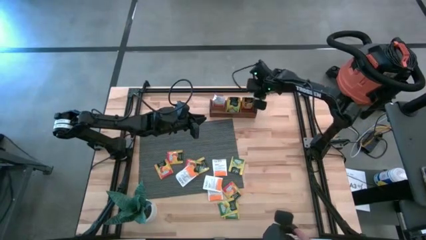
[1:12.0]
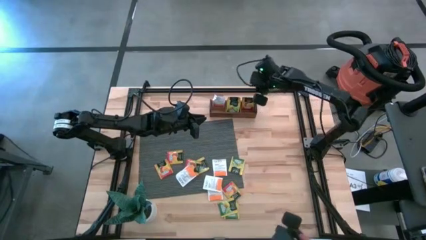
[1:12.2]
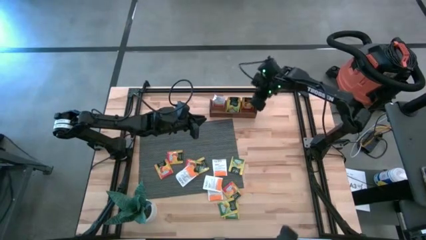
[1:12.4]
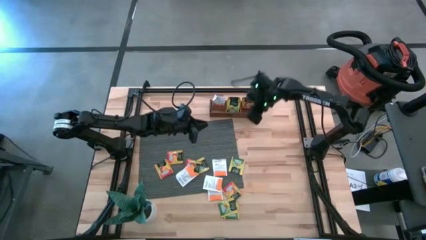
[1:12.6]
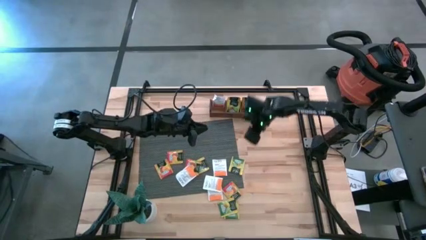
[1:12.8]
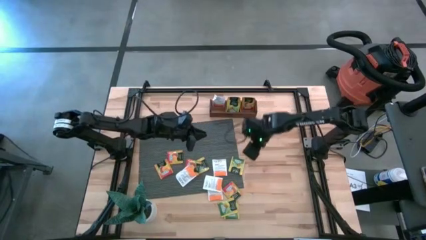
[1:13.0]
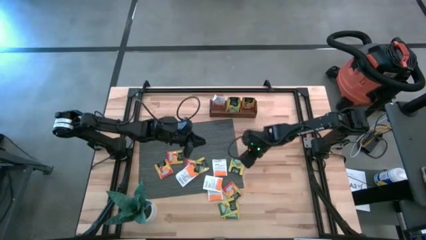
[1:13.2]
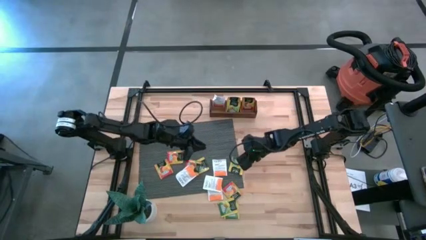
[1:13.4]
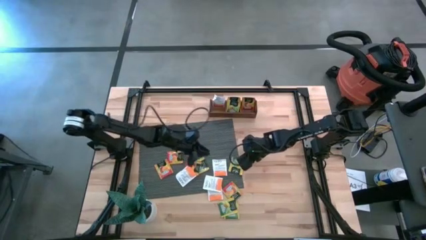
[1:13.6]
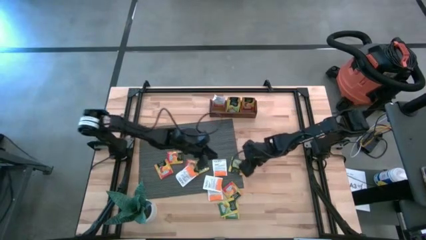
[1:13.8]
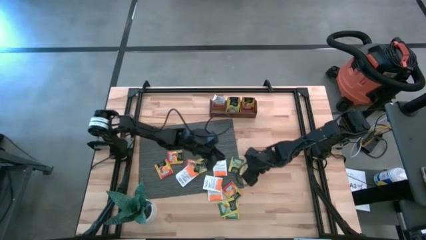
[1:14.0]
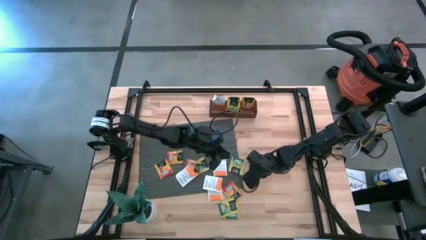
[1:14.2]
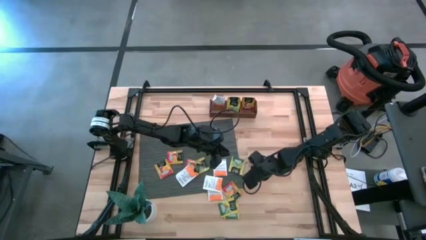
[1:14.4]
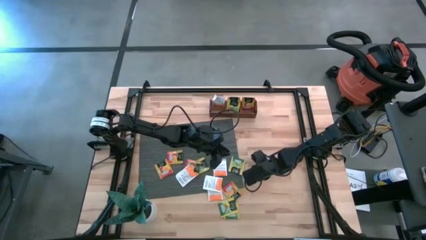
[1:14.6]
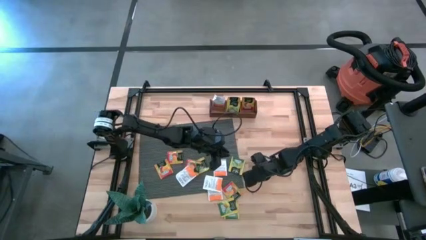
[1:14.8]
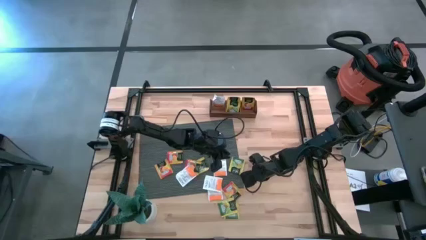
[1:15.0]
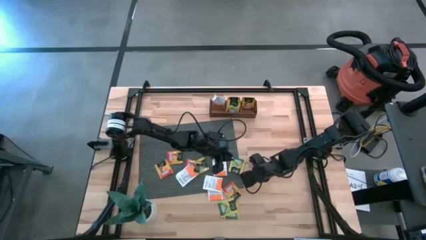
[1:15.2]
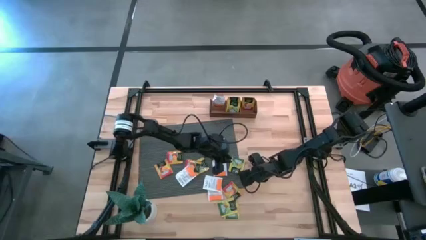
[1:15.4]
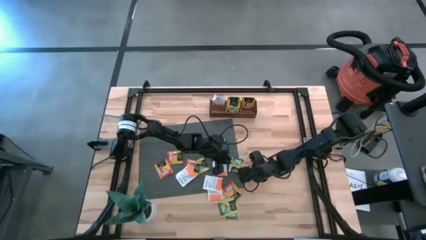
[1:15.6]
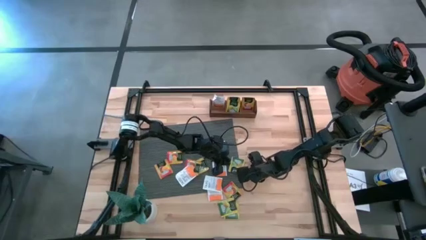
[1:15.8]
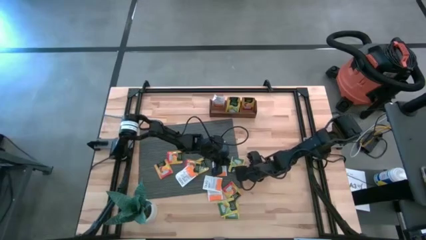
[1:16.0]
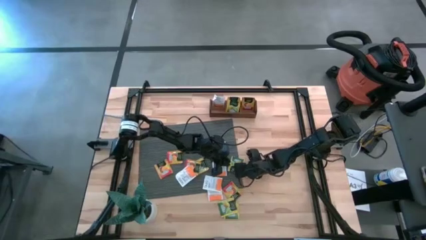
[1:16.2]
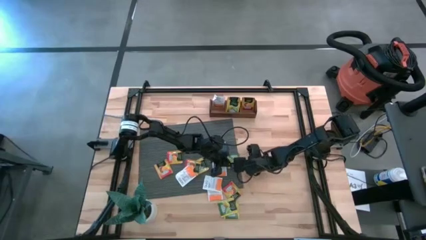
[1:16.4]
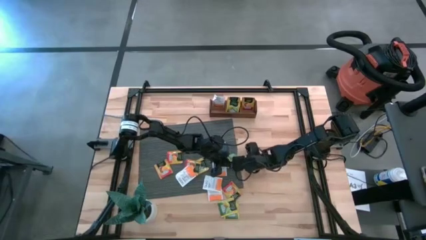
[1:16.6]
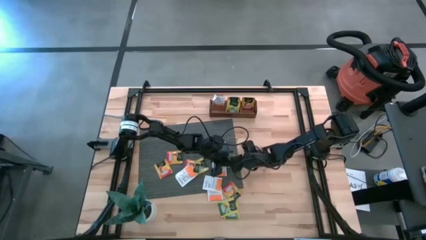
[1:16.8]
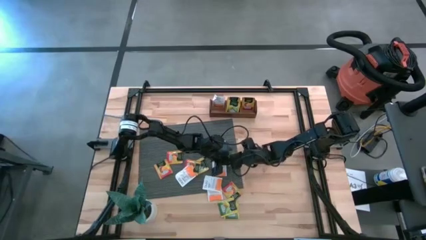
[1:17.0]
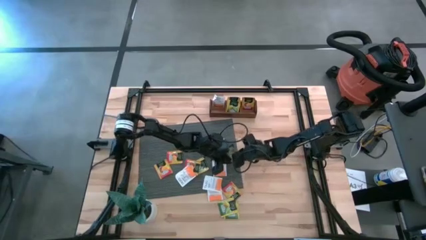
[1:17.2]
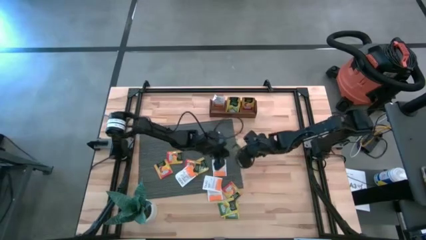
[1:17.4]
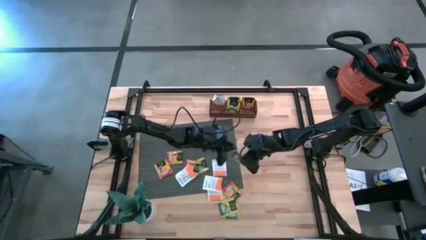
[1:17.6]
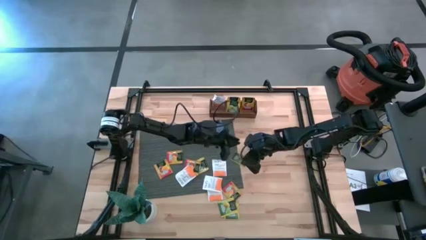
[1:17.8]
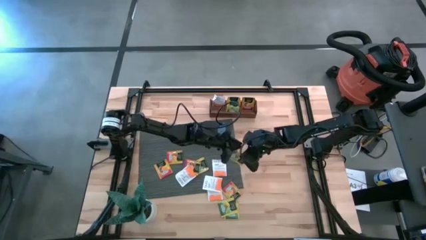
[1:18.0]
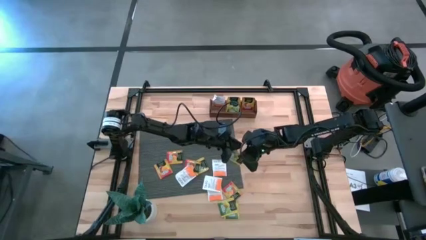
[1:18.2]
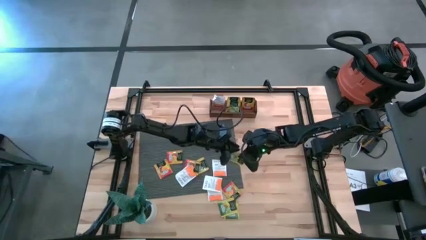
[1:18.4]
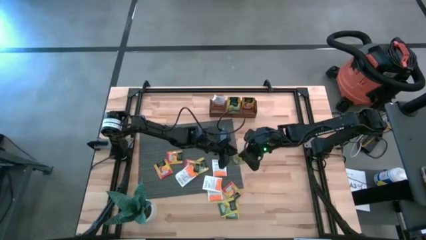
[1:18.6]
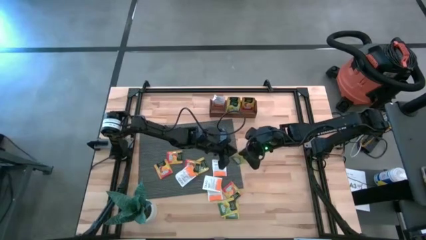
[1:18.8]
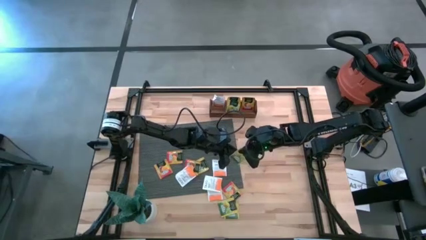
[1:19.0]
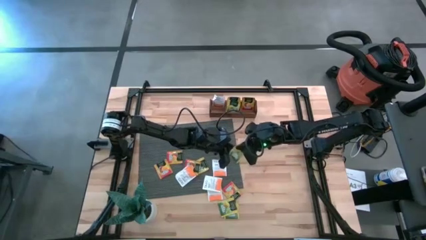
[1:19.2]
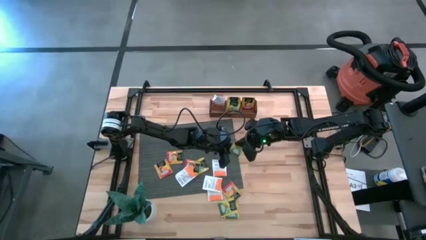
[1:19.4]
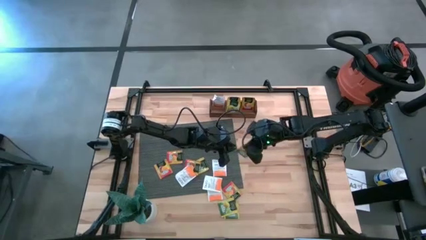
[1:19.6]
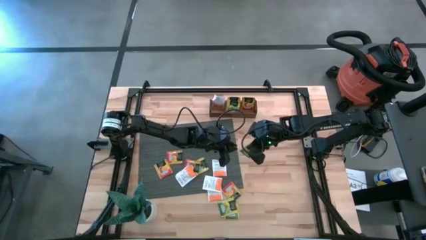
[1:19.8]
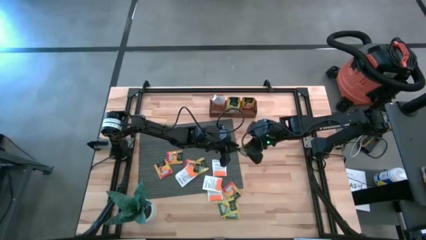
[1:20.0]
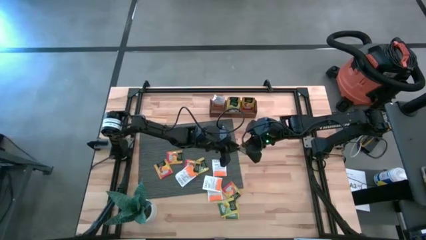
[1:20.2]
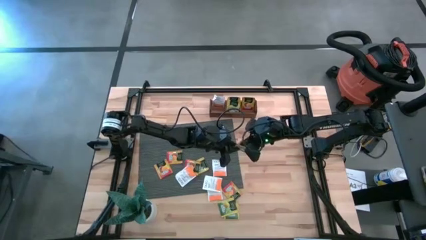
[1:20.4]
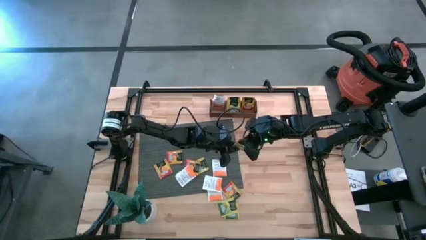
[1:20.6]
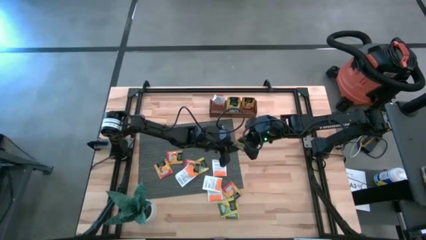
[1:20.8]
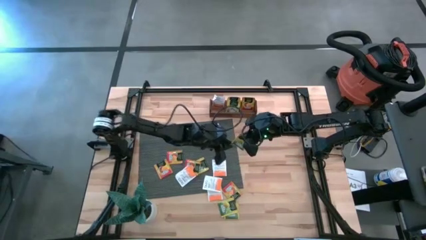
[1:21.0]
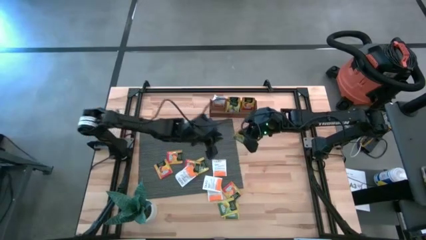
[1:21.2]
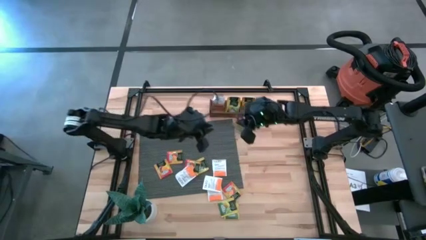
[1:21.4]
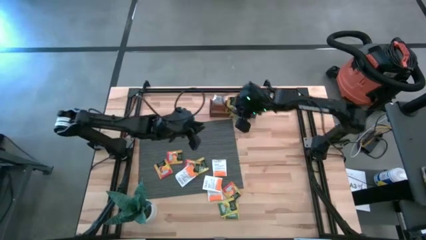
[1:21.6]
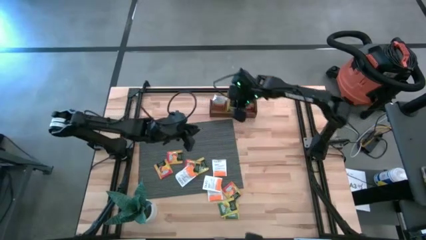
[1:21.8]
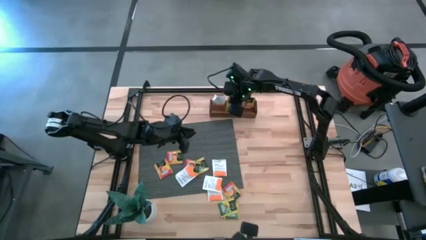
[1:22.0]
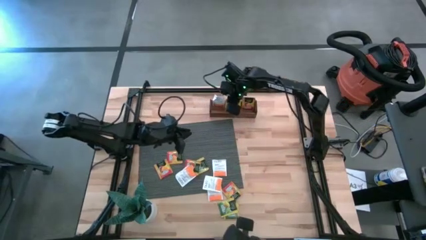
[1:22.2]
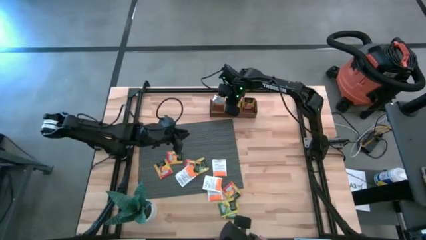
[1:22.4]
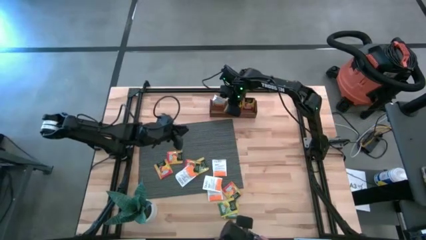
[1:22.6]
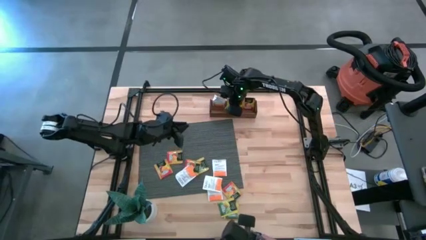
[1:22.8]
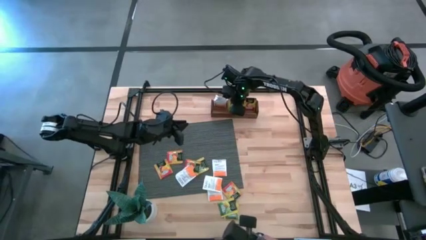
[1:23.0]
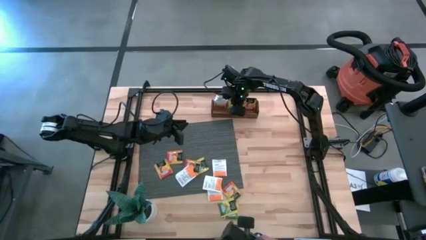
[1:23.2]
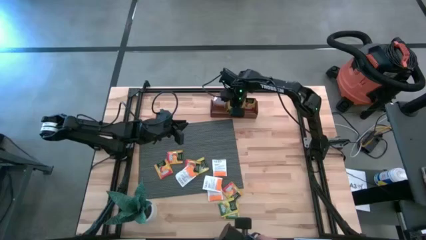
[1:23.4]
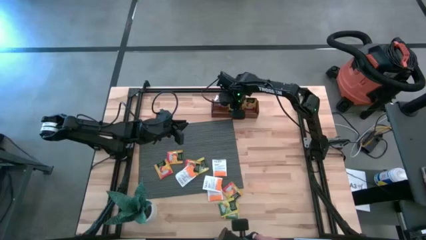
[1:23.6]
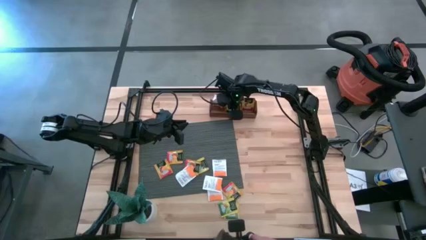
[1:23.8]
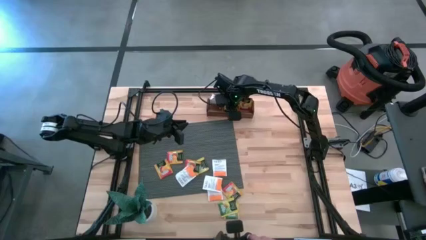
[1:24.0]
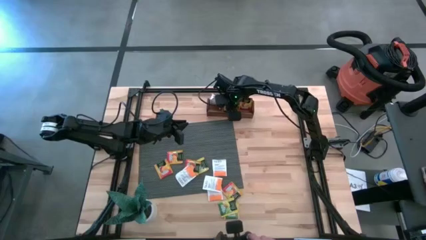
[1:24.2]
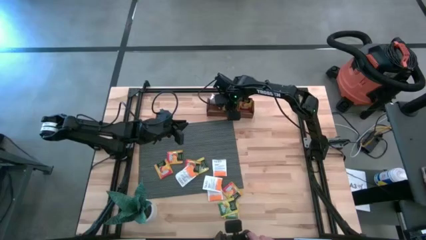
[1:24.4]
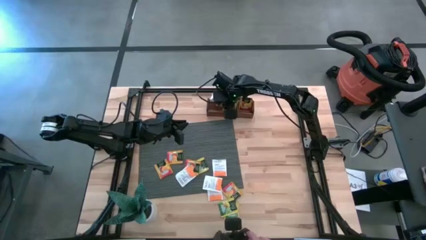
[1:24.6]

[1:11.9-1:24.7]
Task: Pick & Place Tea
Put the yellow tea bag into the middle section of the wooden organizer

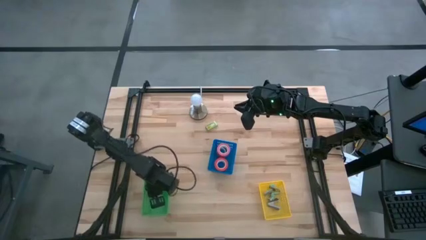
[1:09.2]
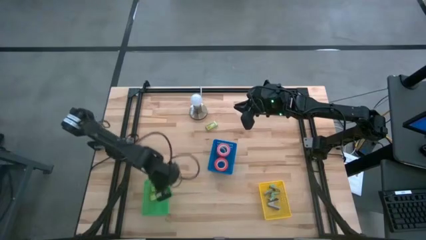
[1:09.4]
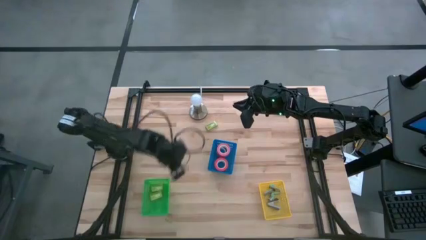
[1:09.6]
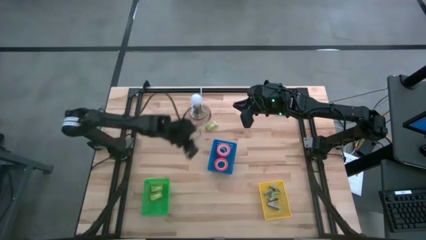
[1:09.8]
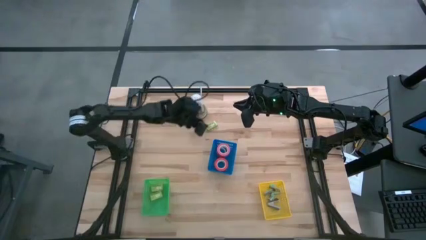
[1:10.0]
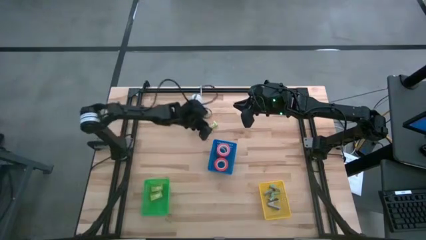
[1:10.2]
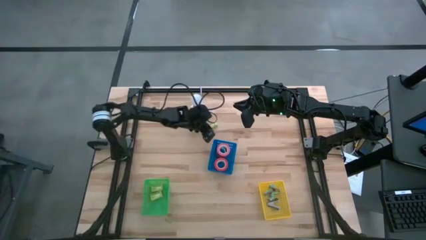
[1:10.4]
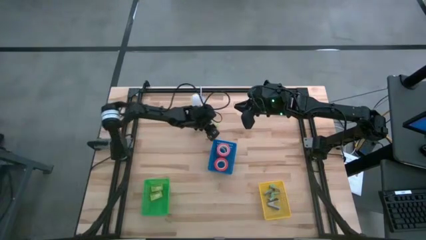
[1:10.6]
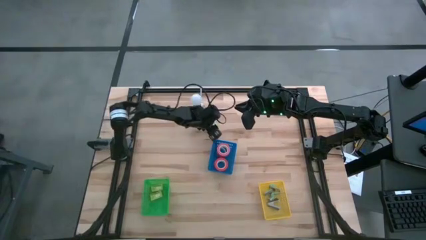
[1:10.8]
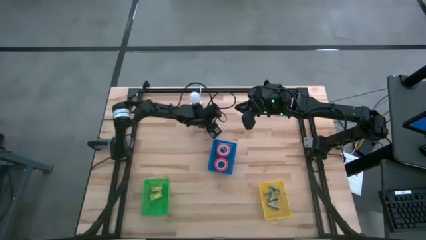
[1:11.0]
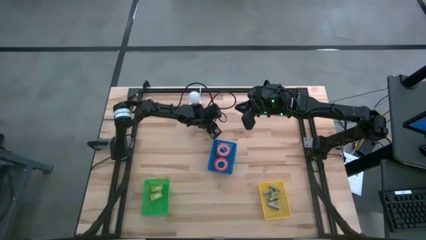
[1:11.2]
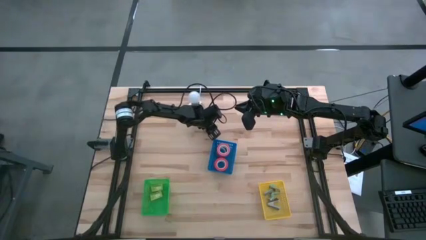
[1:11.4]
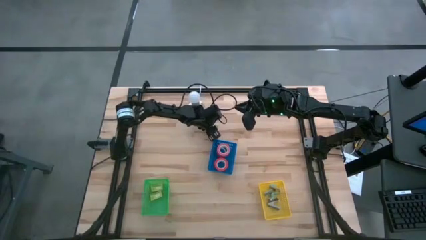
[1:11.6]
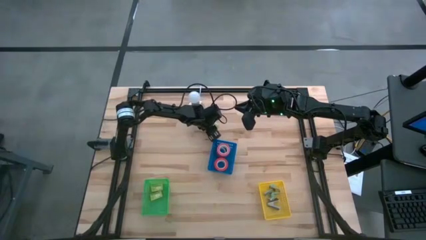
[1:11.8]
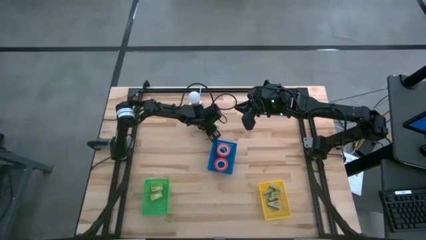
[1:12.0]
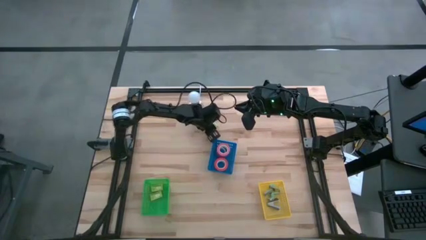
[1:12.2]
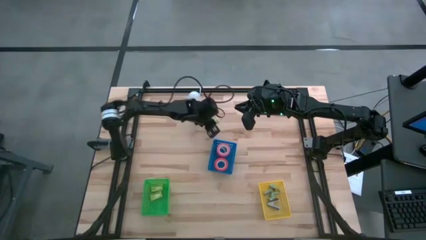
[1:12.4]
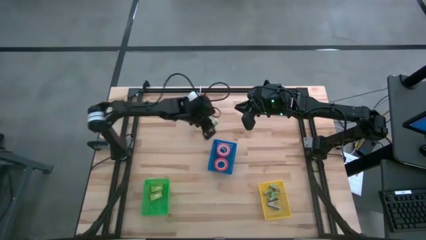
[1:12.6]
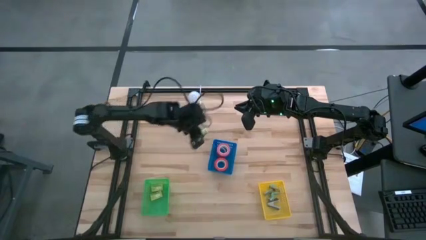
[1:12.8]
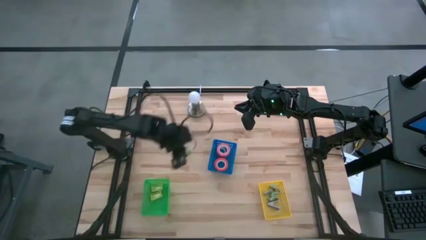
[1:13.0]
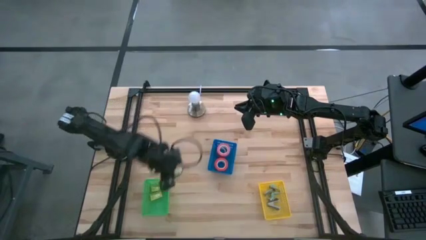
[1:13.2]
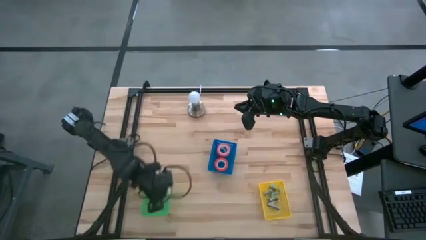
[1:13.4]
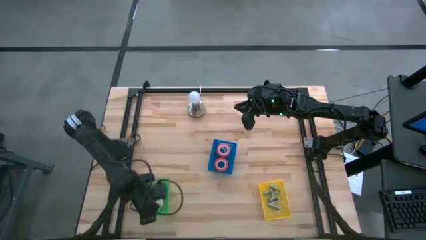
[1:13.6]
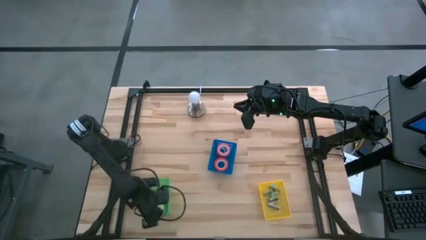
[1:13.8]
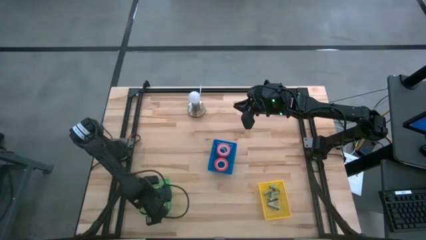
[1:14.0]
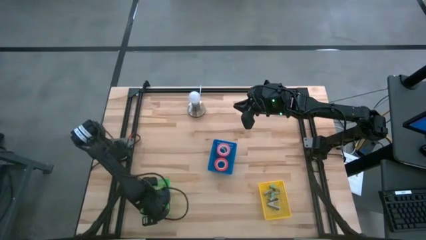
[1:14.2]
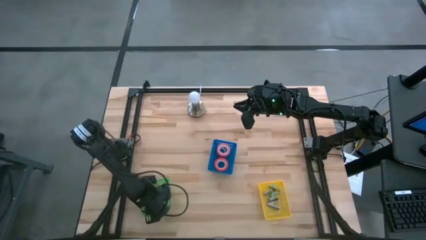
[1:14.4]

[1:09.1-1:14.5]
Task: Pick and place Stapler, Stapler remover, tape
Put the green staple box into the green bin
